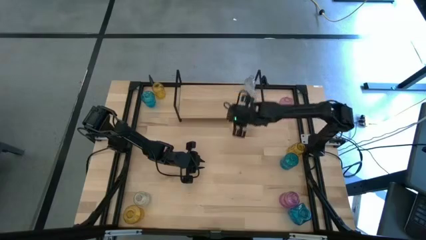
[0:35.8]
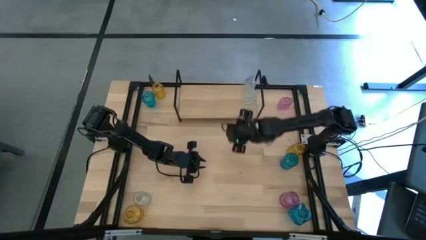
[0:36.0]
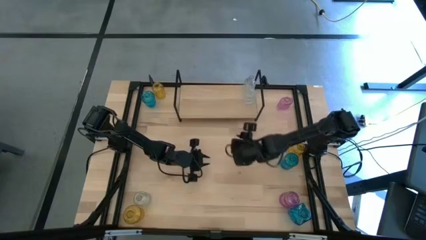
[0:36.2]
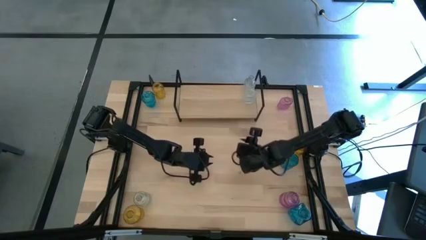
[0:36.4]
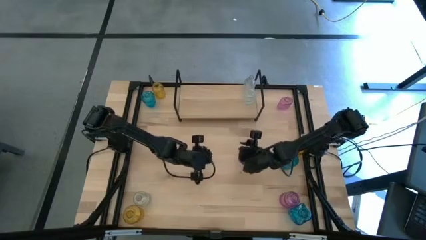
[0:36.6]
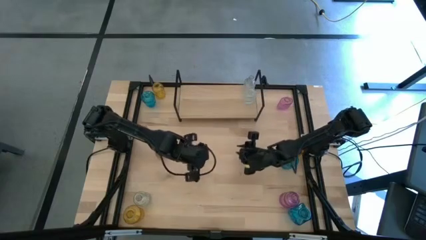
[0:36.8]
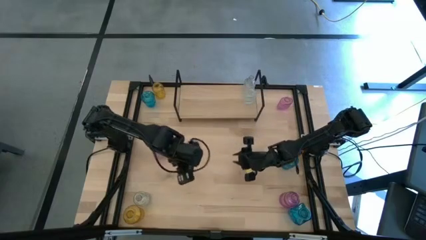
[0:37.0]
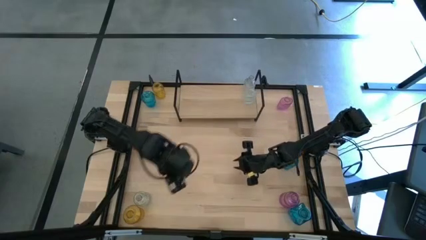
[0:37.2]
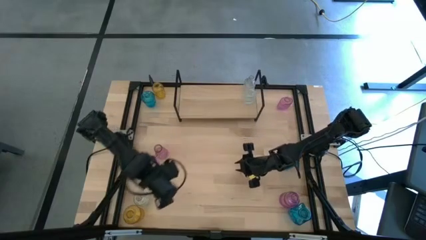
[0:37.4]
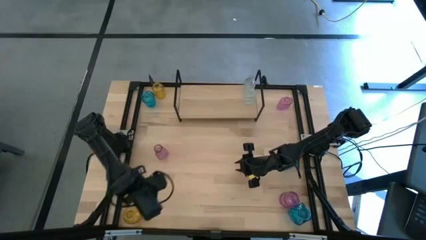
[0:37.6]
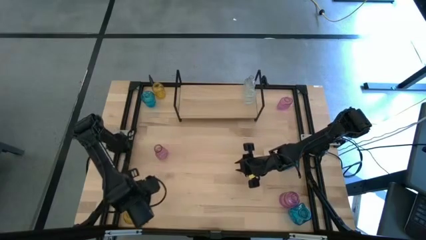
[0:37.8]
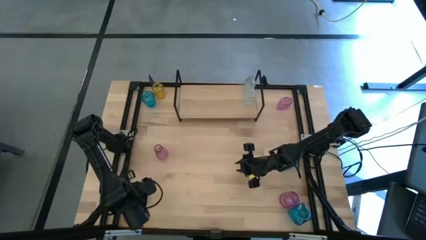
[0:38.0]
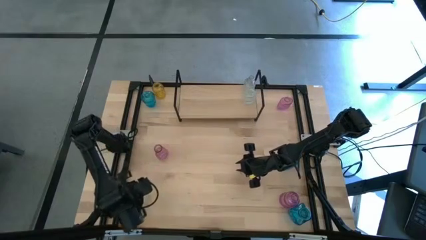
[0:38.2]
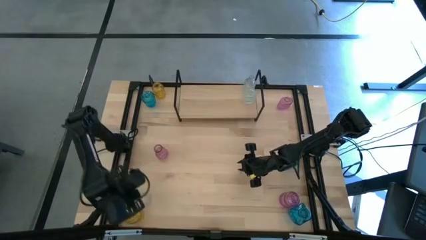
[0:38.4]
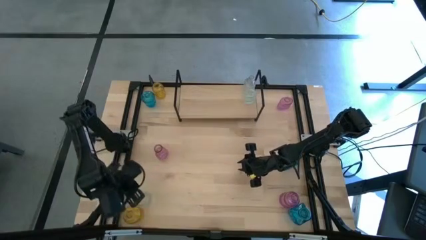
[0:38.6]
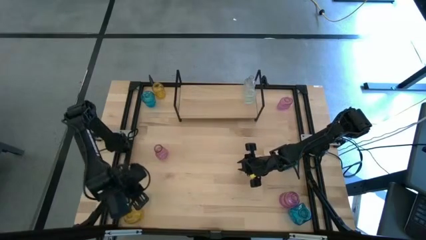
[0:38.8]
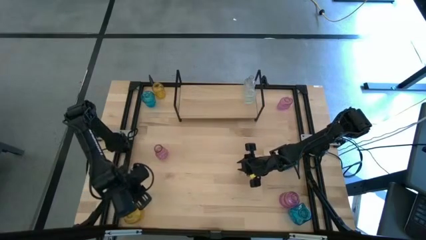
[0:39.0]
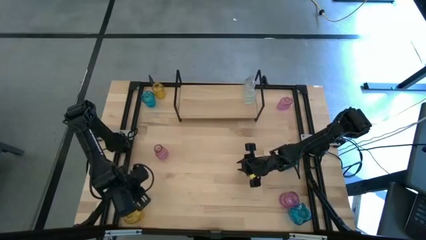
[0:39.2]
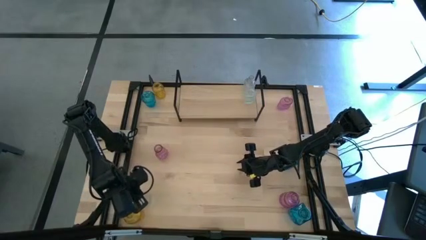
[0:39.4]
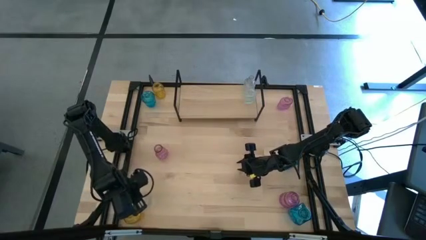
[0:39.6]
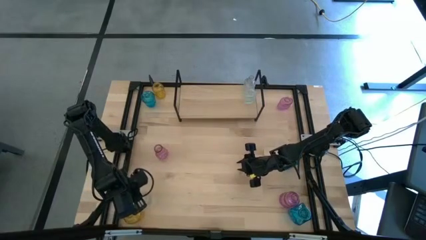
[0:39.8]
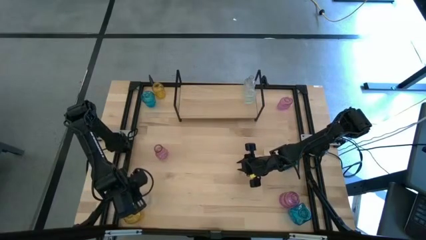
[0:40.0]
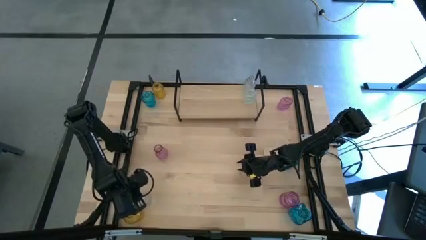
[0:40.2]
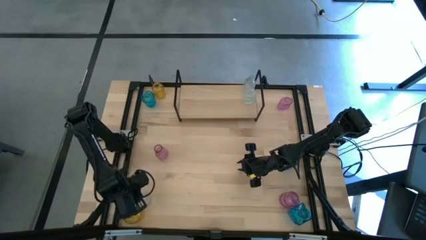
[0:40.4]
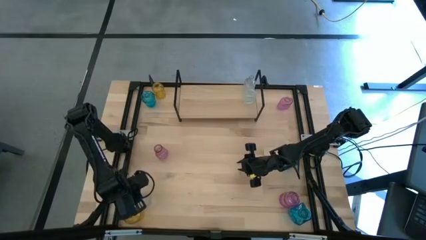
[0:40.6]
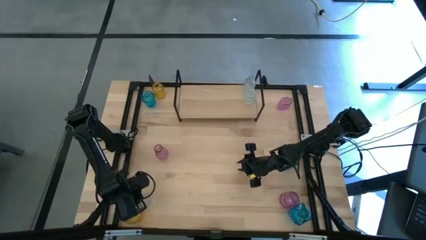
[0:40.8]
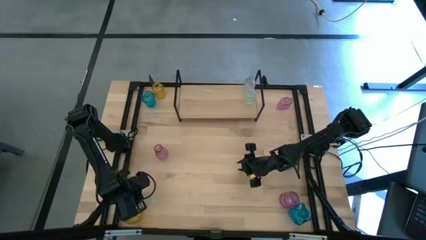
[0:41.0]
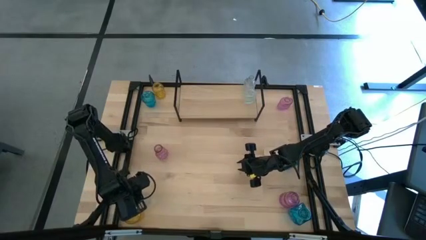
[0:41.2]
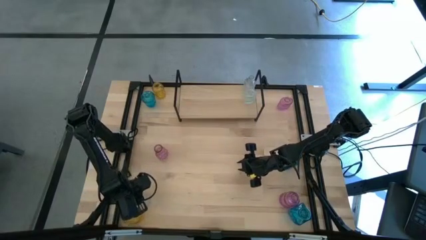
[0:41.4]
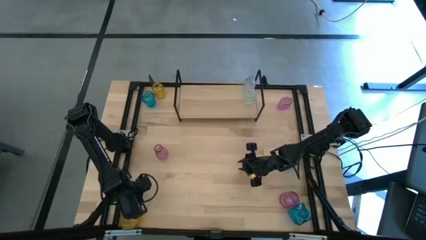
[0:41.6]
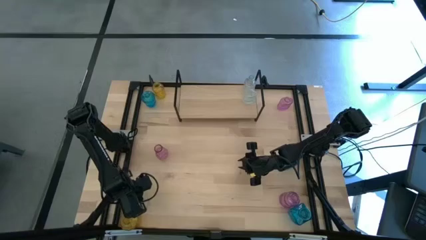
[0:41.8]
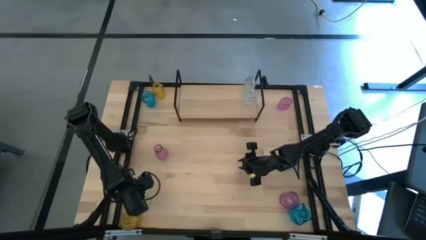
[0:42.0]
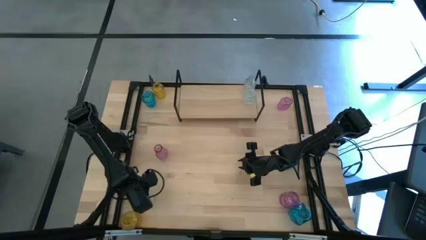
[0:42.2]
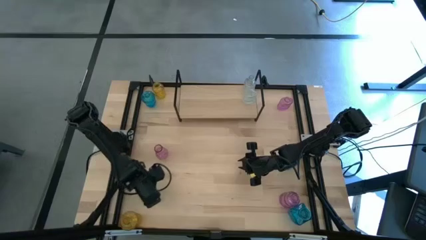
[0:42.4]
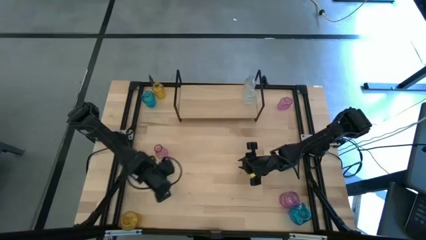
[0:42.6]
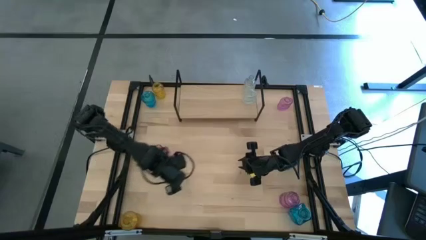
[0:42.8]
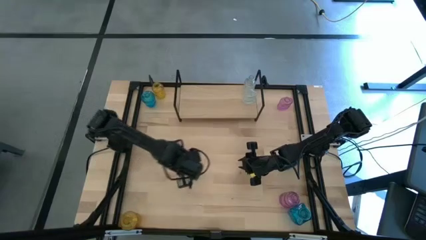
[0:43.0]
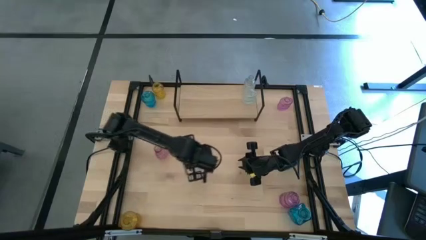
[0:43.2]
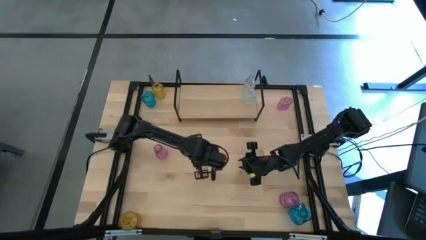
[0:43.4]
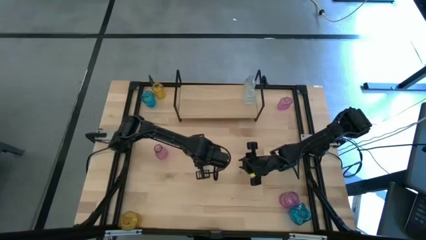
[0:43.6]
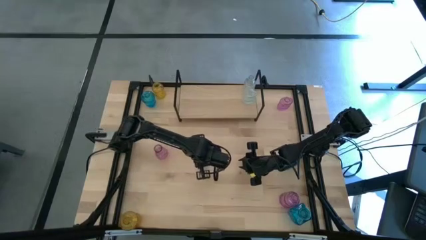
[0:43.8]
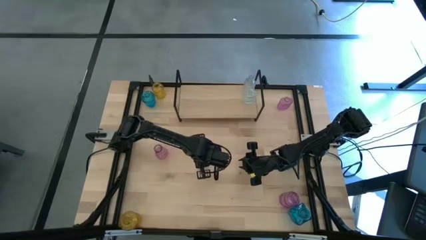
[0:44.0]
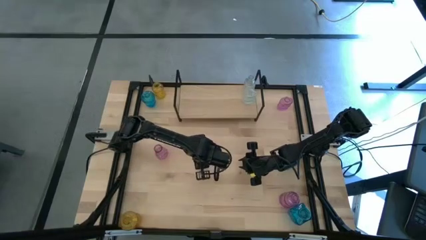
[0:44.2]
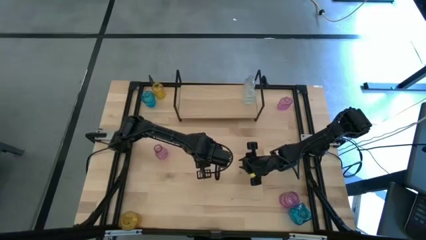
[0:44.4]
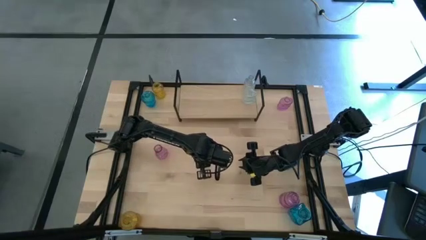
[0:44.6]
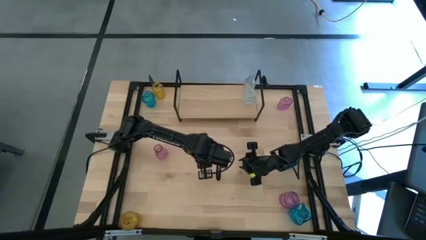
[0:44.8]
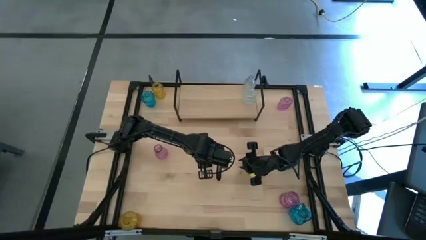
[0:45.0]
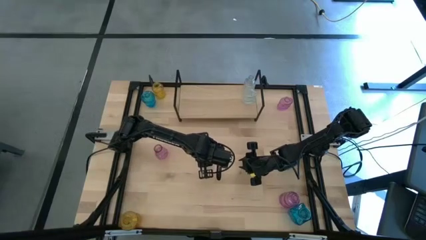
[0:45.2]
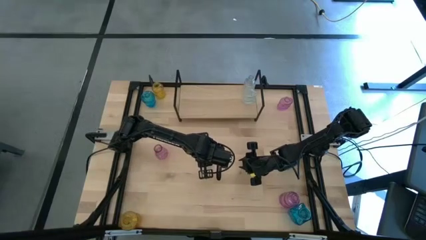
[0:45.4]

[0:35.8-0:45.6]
Task: sort vases onto shelf
Put the transparent vase aligned with the other transparent vase on the shelf

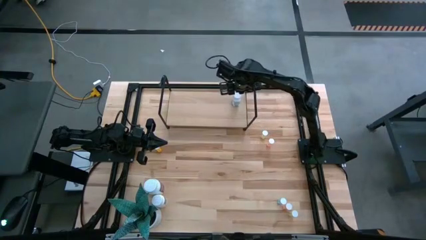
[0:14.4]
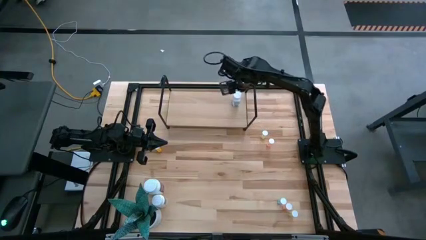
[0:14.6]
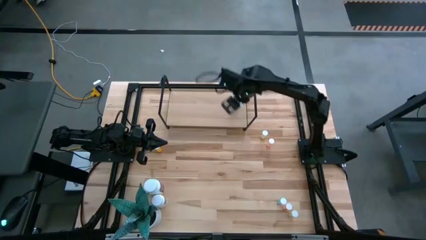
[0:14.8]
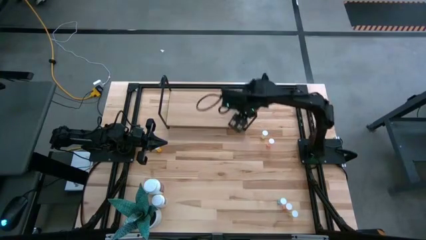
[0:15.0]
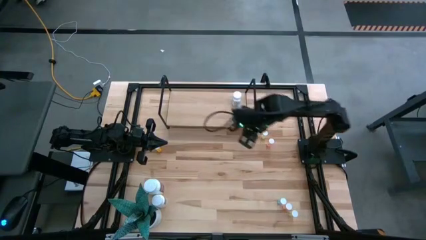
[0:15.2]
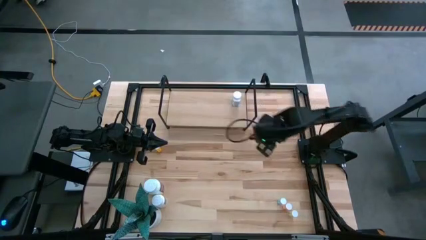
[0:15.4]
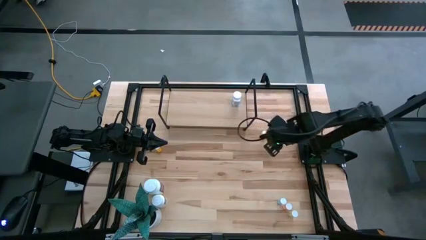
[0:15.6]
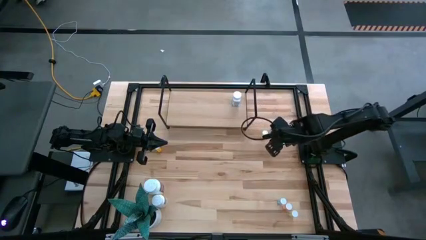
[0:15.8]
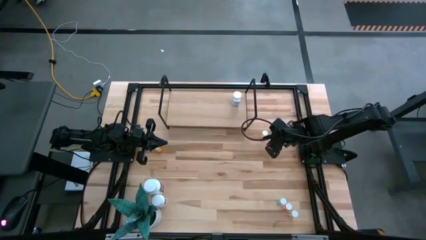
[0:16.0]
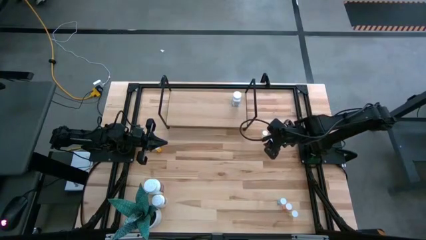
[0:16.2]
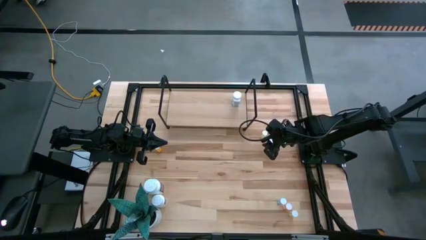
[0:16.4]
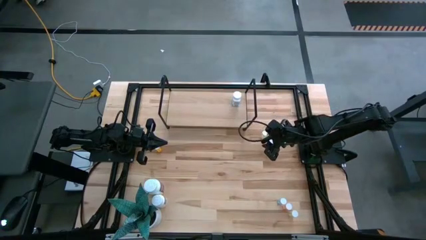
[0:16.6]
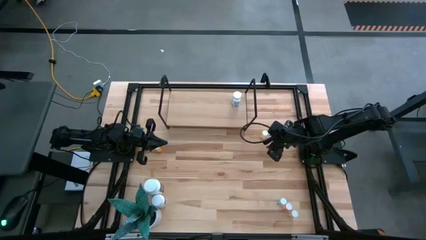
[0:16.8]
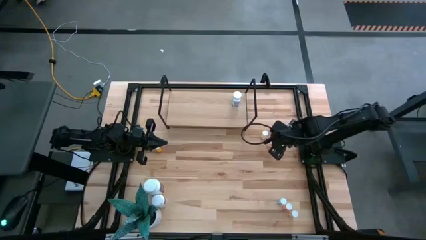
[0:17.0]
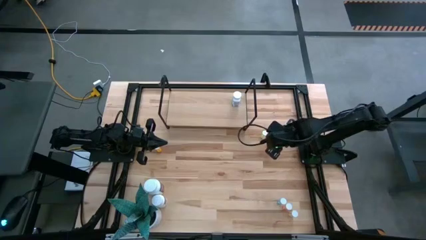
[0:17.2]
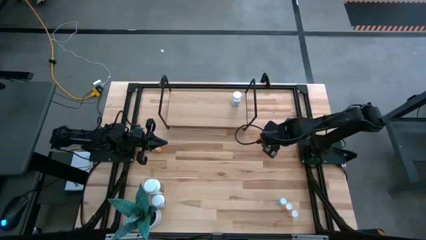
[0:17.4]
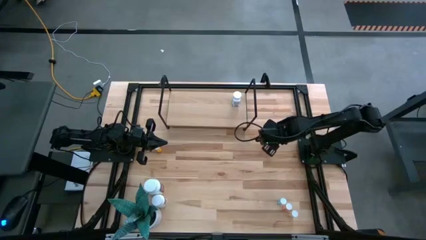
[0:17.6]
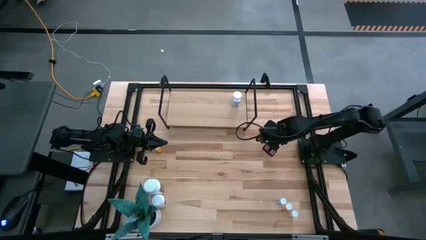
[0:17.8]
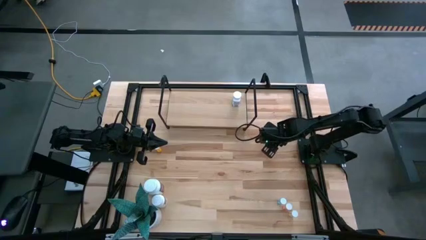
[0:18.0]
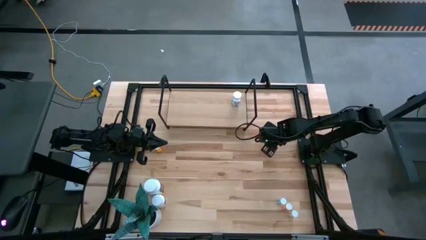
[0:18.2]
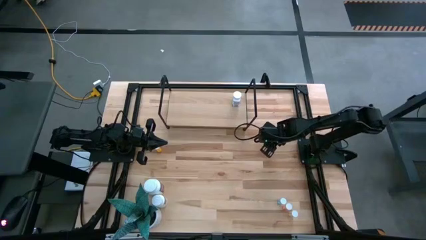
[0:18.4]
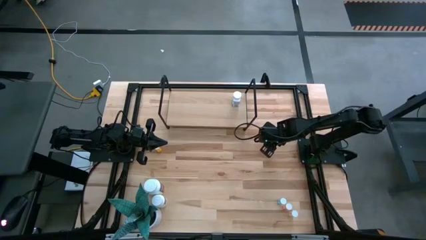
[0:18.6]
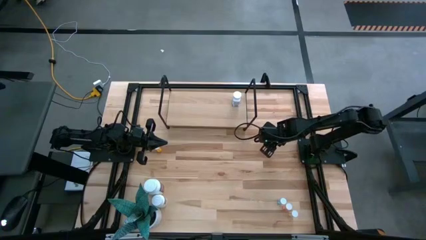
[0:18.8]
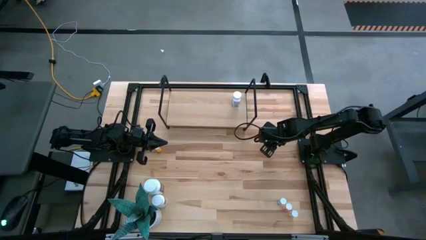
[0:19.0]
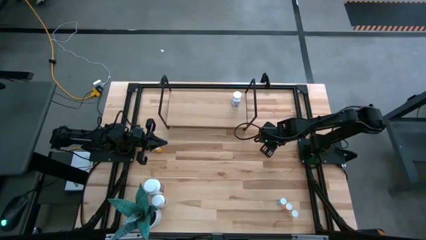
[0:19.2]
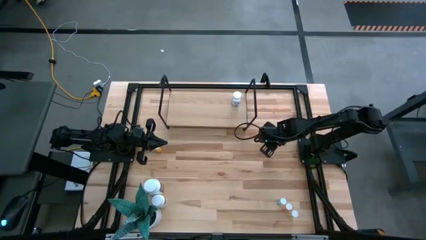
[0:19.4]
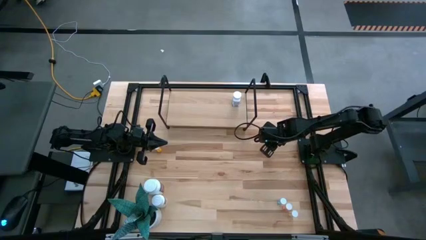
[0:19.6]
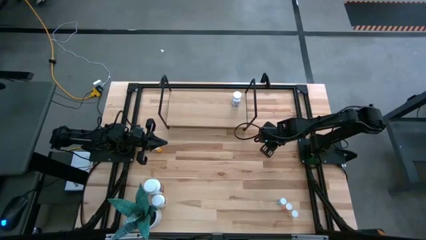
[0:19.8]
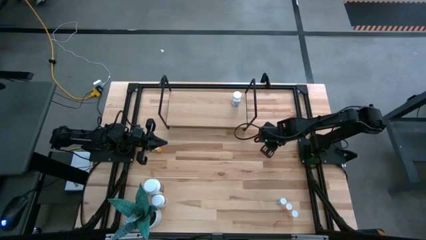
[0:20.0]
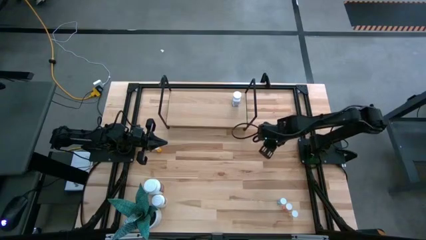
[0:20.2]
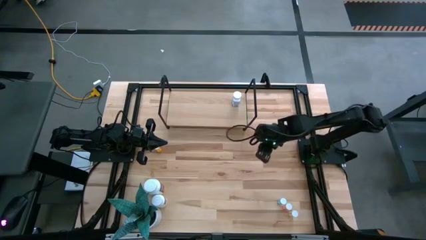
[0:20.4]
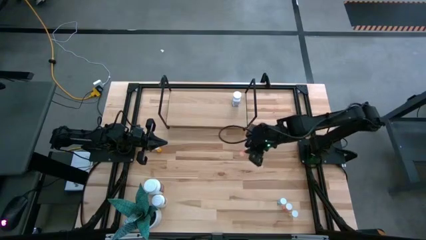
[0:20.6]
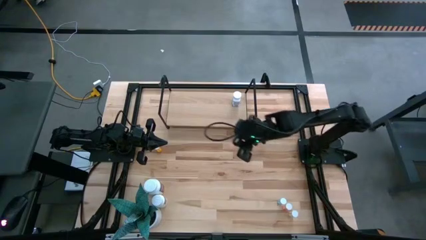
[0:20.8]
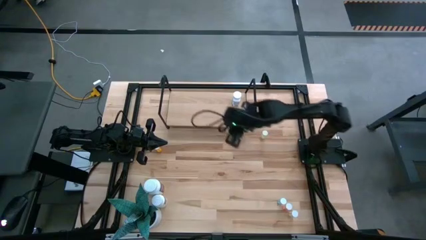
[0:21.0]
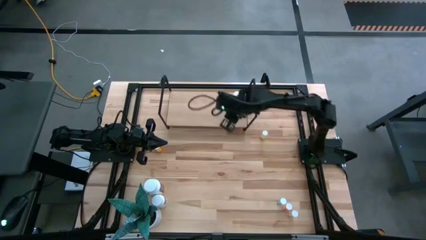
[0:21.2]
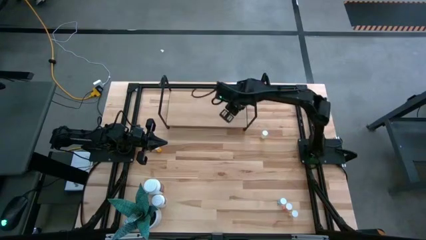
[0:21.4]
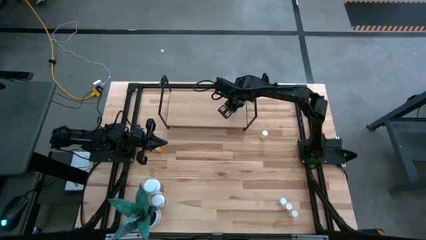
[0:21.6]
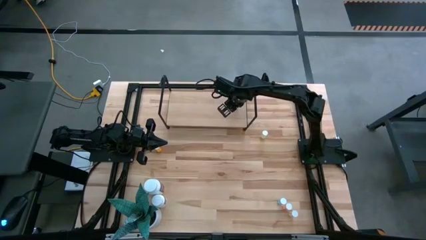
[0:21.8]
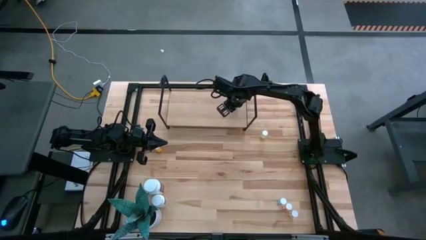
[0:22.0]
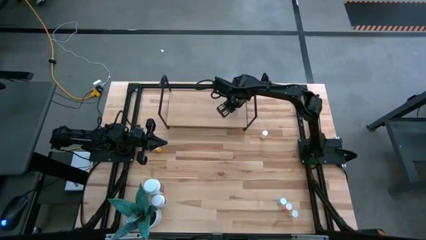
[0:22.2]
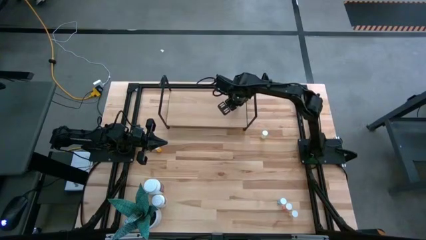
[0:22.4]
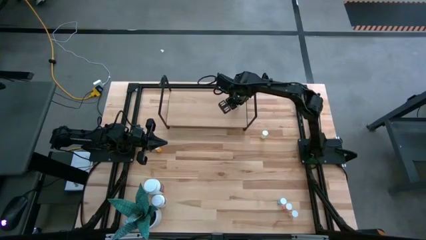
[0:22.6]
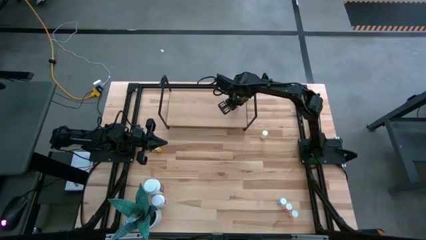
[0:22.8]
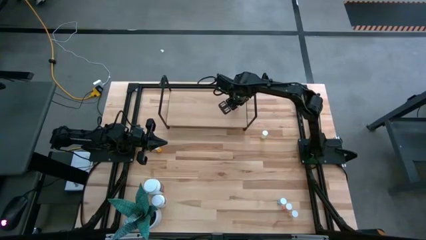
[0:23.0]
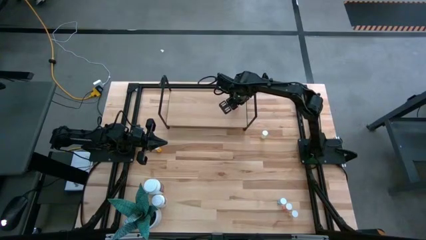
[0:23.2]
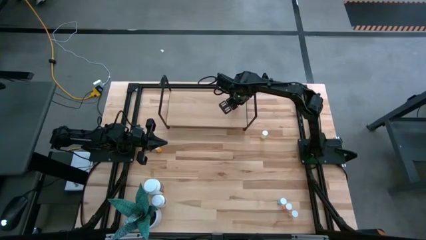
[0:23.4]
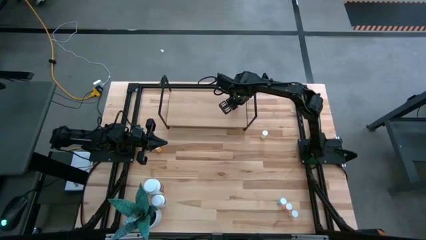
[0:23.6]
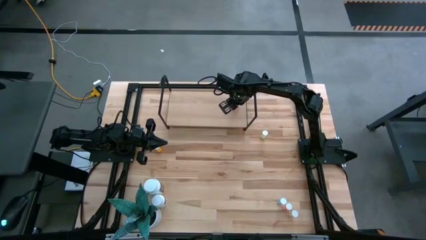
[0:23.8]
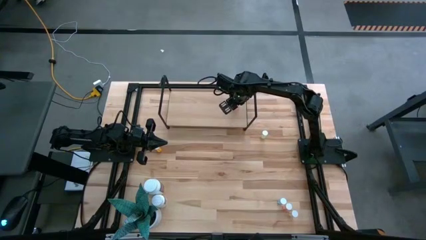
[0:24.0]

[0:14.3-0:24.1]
Task: Pick and place medicine bottles onto shelf by color
Put the top right pink pill bottle on the shelf
